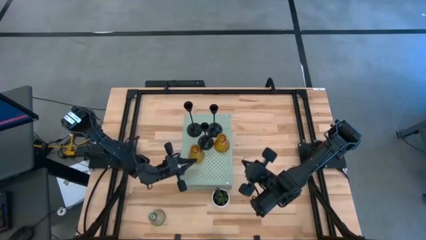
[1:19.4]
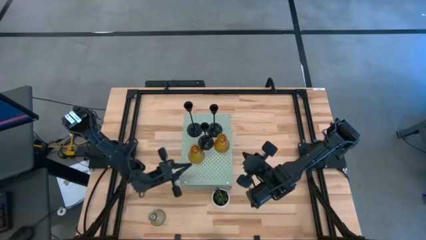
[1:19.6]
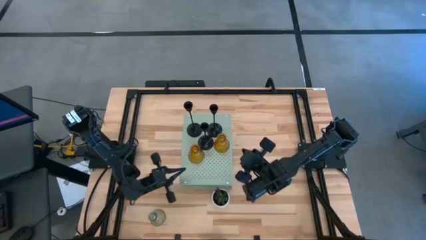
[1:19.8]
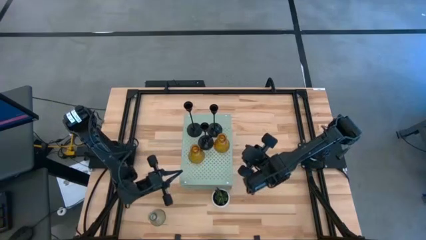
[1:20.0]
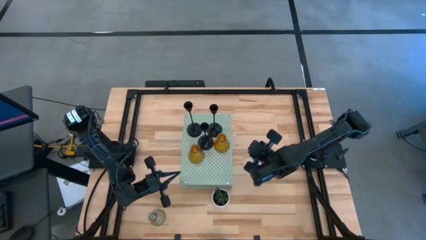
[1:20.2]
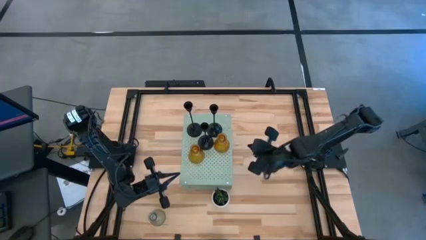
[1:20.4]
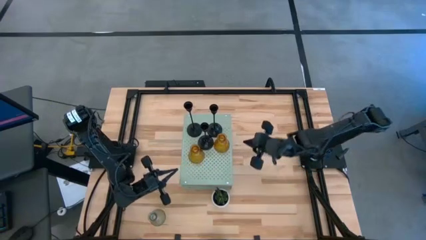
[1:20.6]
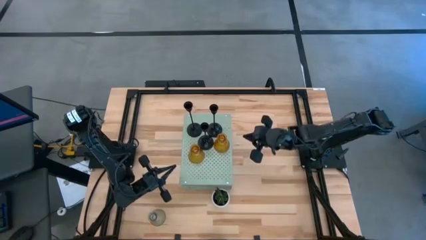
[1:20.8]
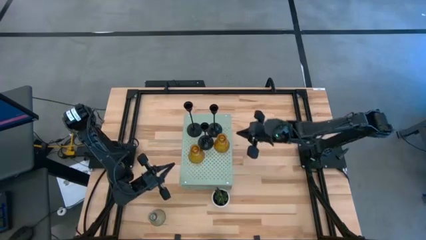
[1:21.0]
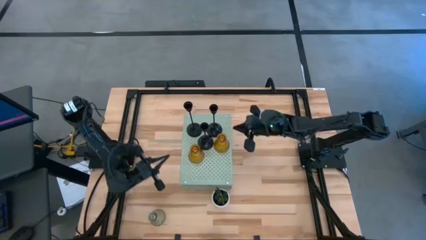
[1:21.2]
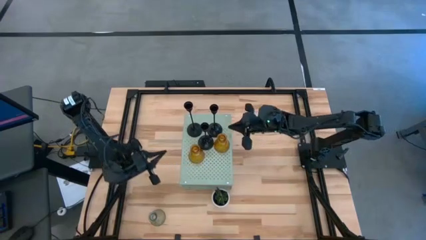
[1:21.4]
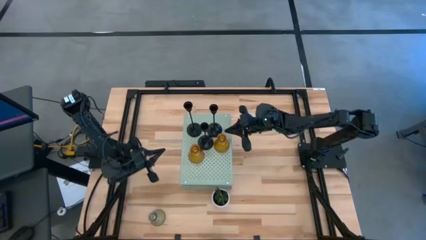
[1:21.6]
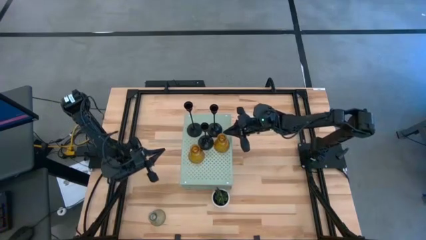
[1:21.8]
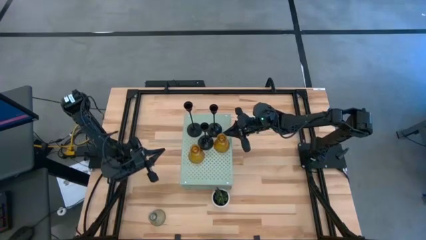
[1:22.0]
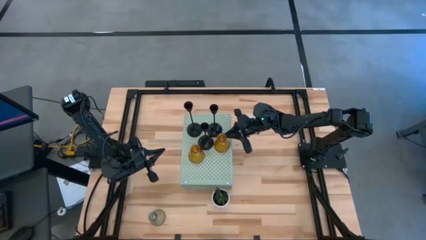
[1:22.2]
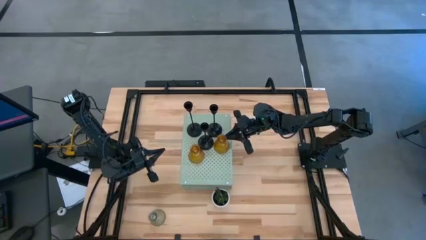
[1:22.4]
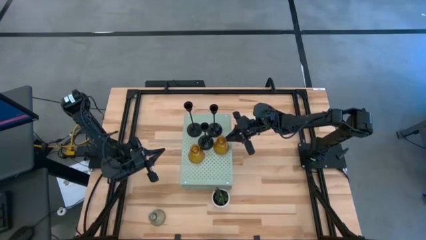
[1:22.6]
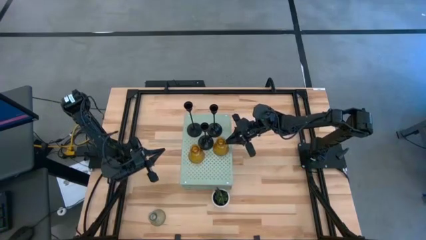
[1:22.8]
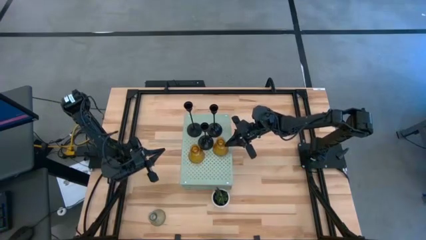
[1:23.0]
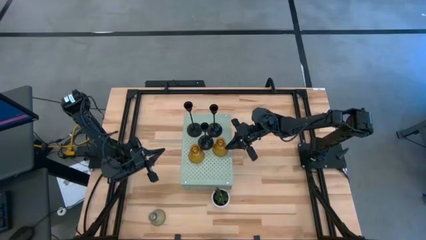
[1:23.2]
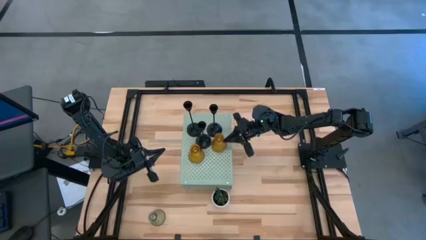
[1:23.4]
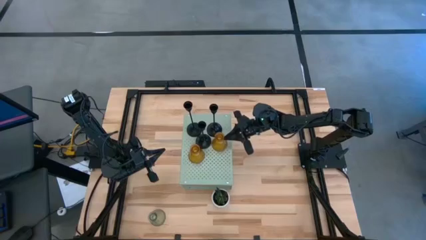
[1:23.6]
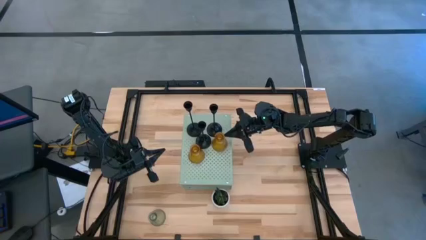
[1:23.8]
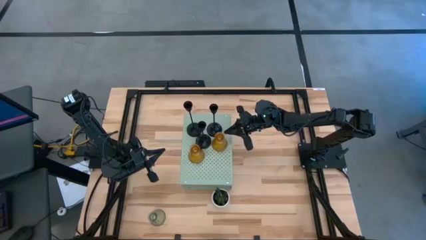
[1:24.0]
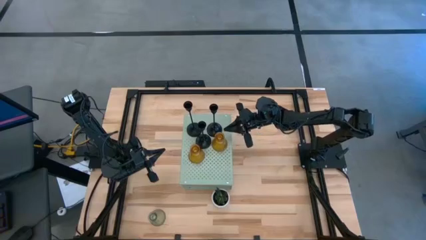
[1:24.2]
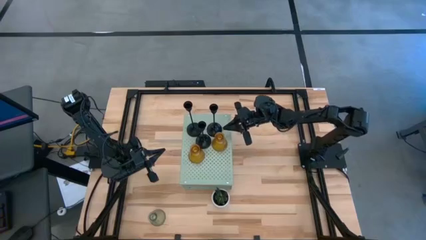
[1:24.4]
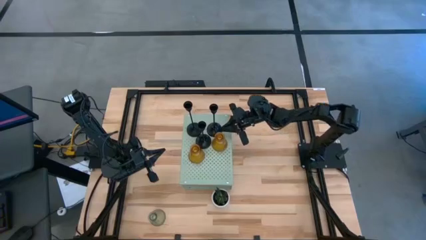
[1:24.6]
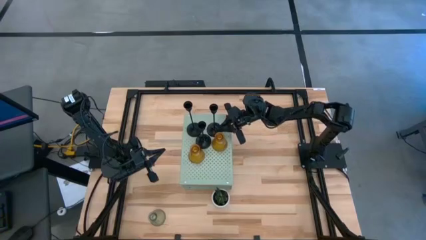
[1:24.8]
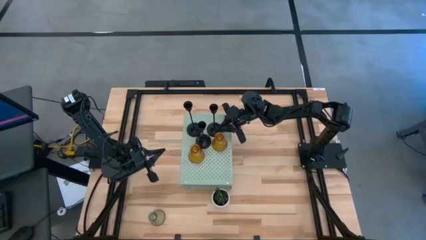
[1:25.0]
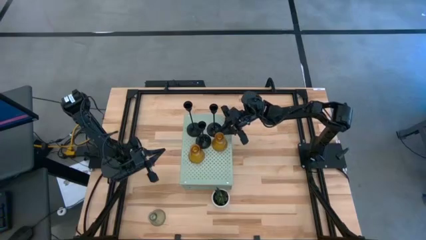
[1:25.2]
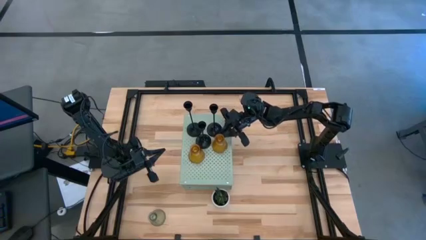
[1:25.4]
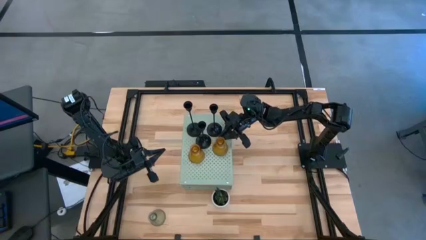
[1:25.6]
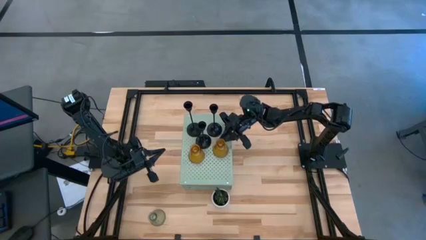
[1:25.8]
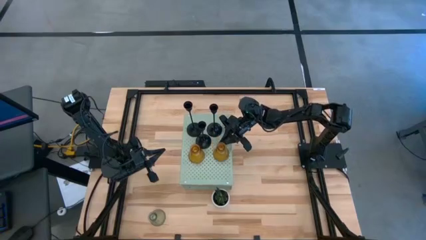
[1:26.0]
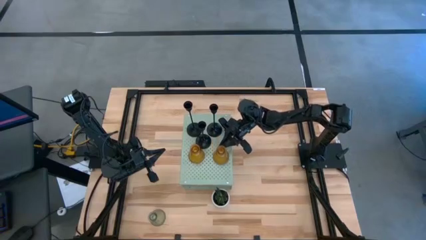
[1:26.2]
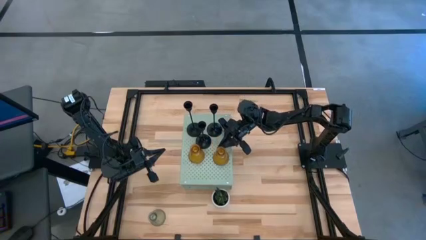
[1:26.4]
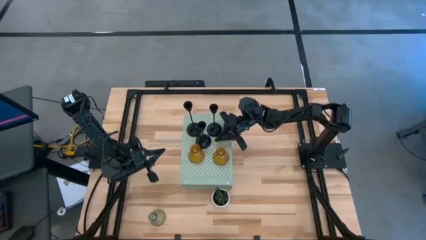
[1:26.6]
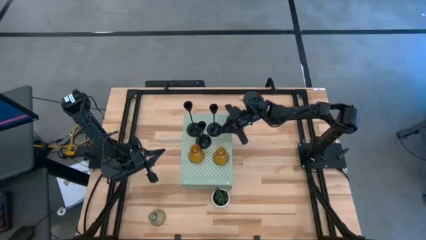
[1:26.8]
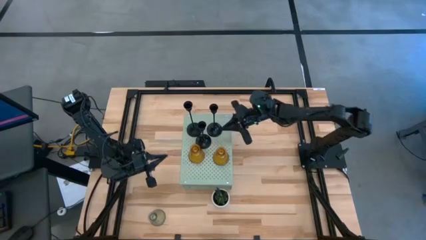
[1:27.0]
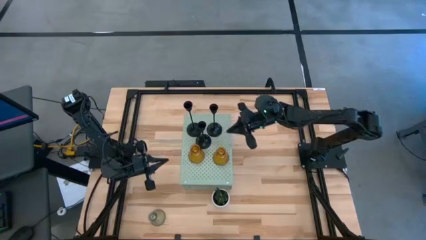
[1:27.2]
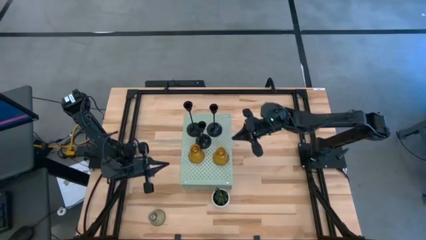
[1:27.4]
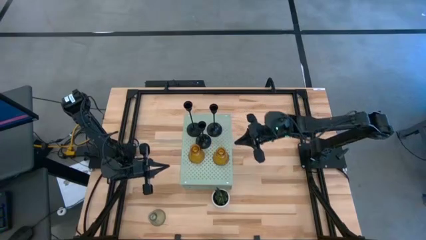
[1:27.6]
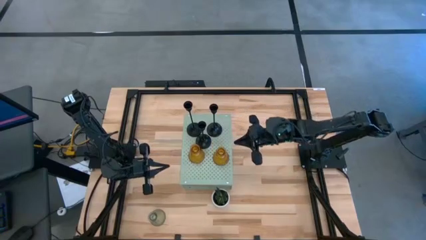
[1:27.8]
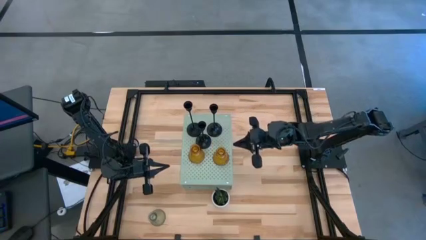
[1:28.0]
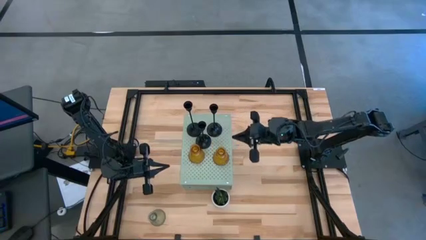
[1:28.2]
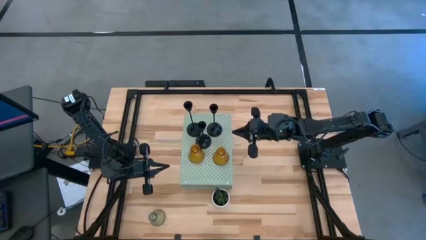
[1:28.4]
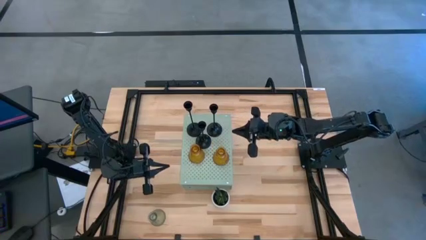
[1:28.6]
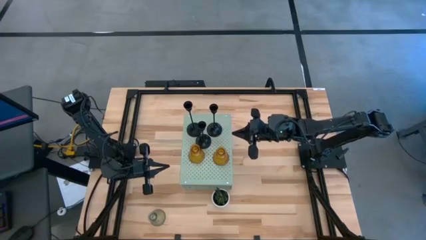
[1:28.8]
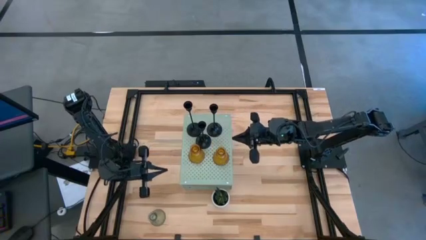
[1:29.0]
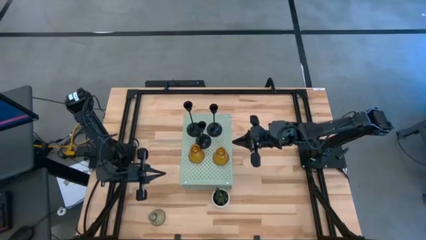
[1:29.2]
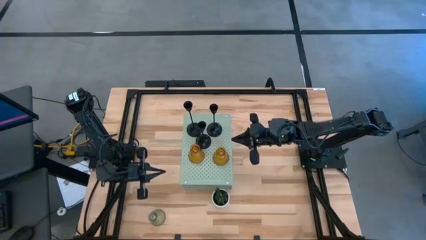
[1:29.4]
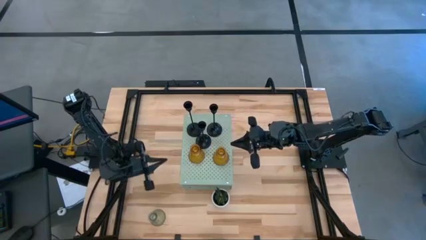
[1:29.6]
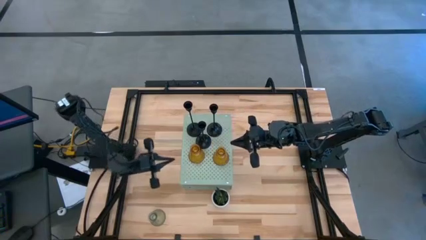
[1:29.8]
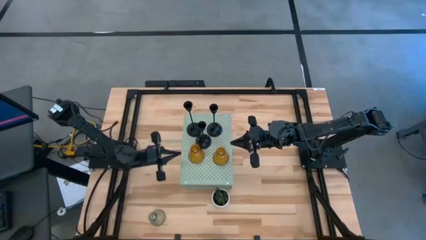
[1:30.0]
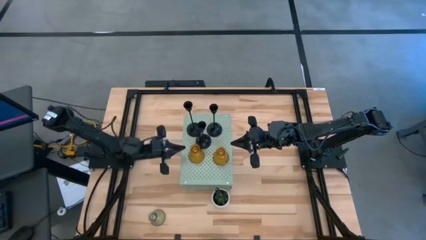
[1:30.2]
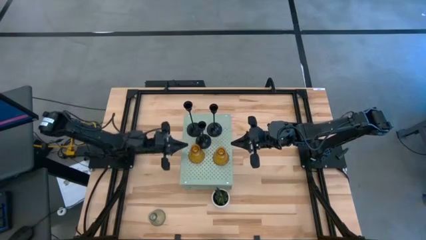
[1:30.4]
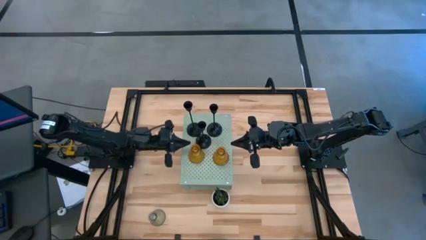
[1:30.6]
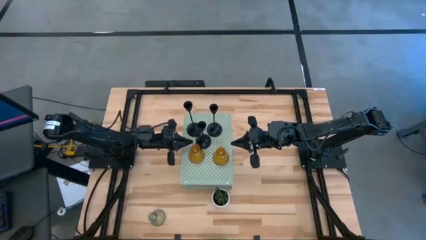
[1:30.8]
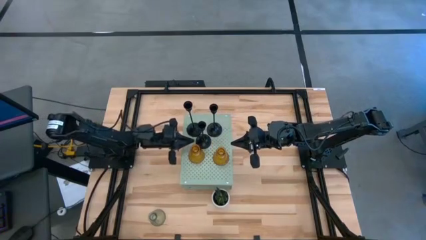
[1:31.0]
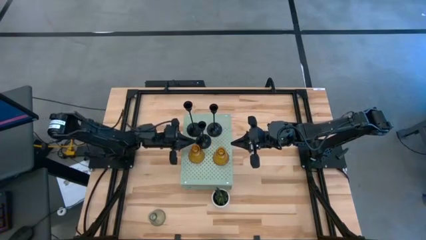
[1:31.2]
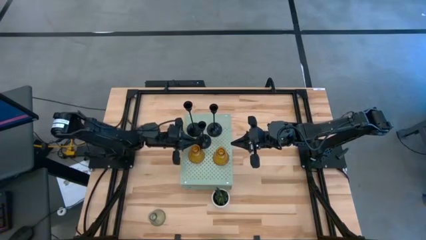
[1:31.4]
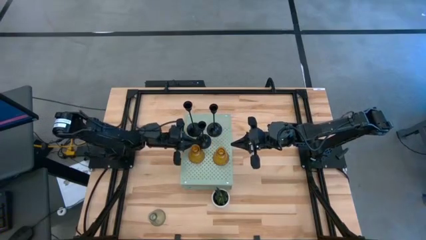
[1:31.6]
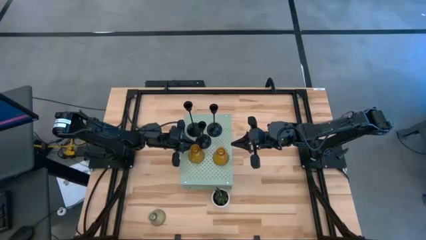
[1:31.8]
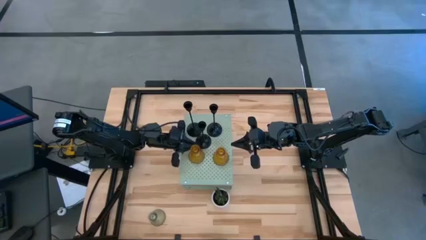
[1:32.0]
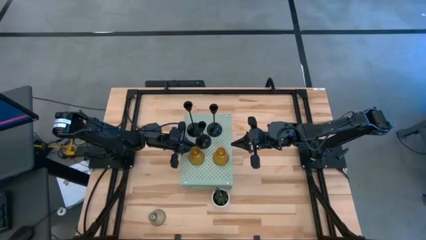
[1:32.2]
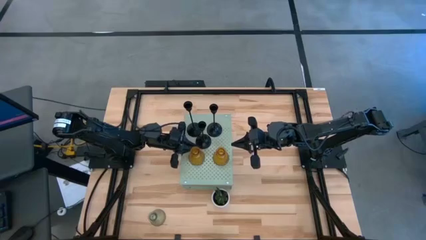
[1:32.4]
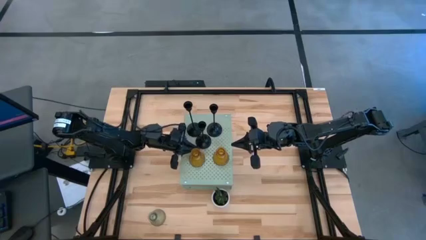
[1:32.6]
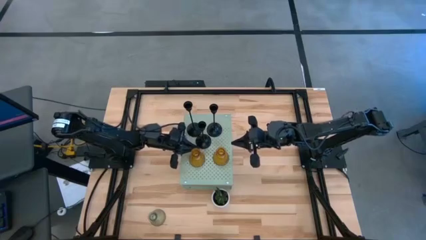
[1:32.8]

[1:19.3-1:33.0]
Task: Pick & Place candle stick holders
Adjust the right yellow candle holders

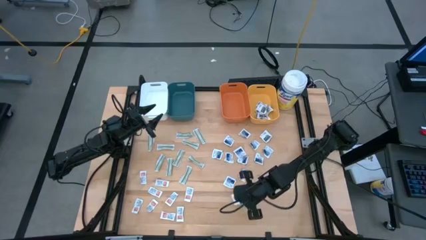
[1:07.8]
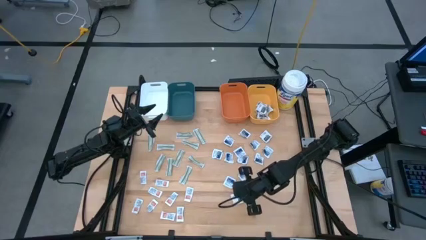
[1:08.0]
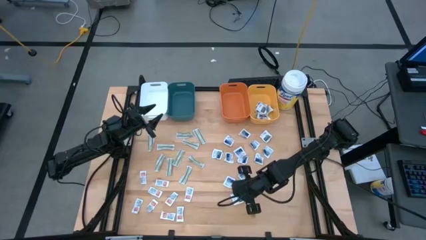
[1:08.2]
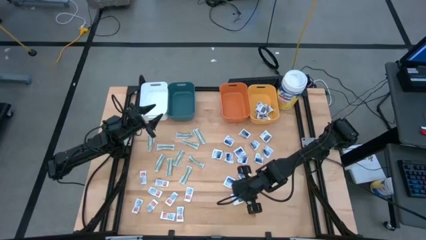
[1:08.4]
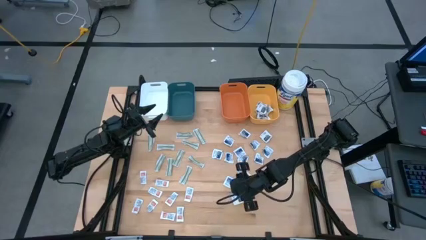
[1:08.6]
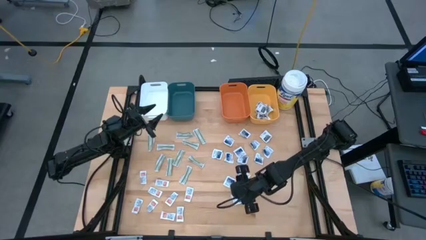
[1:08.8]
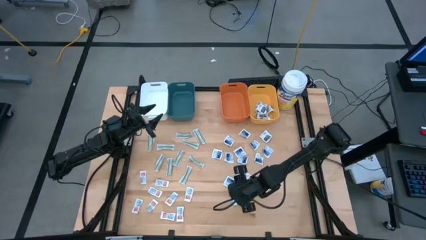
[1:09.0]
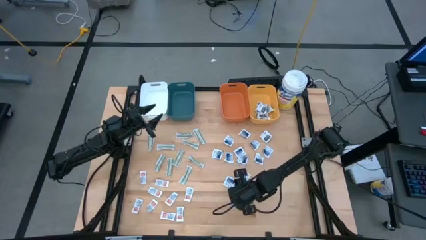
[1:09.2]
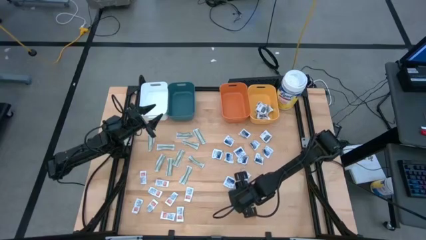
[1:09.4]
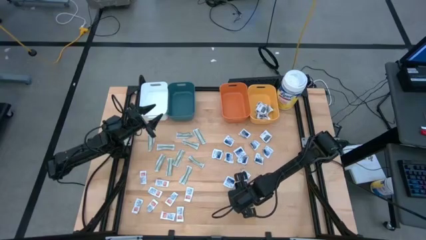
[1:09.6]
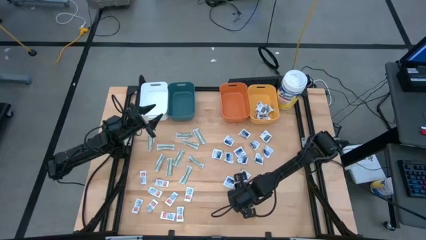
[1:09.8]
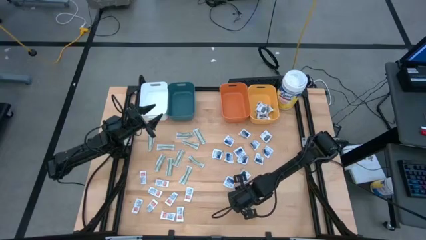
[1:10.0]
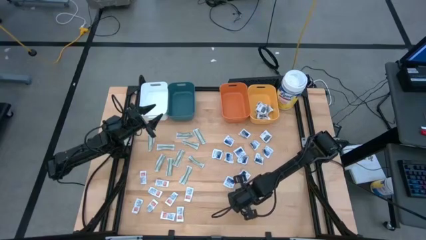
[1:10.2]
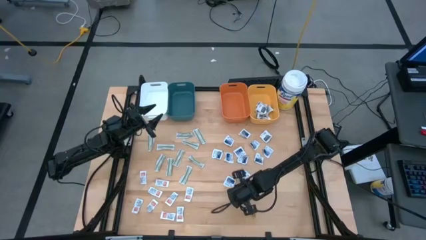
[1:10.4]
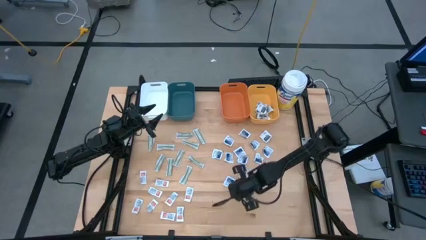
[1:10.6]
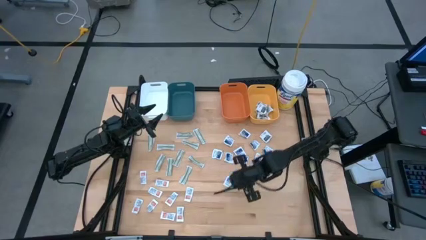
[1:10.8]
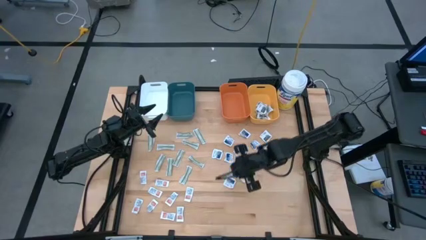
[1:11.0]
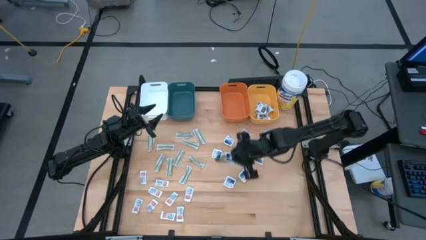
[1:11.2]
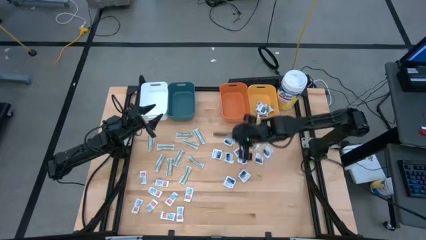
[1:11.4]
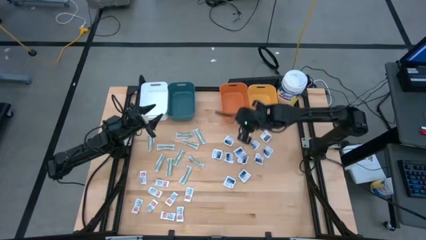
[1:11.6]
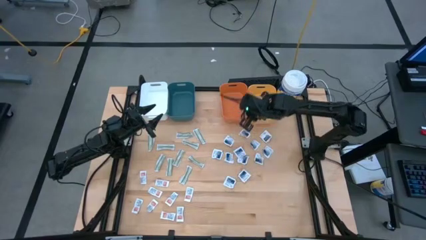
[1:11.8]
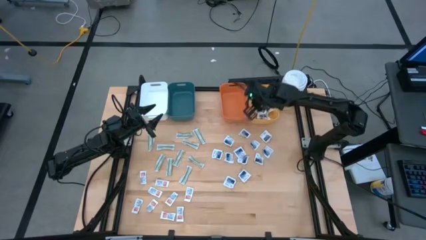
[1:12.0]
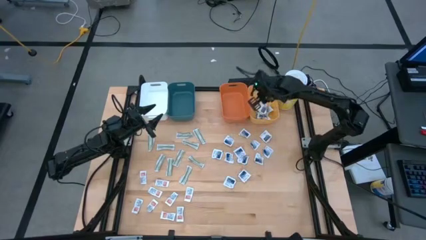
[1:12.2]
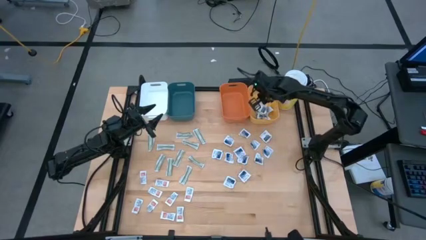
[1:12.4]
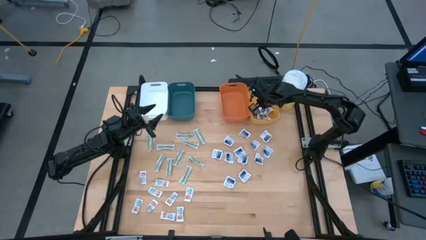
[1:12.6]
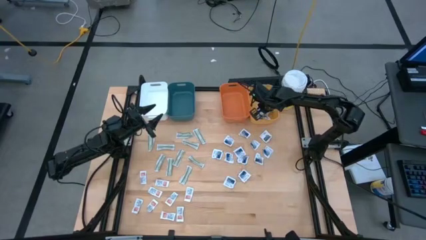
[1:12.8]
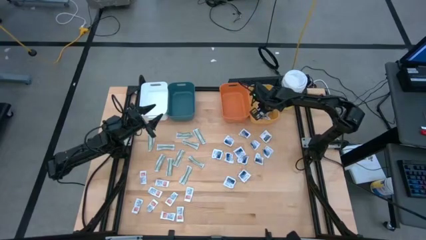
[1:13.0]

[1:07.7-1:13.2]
Task: Pick & Place First Aid Supplies
Put the towelette pack into the yellow bin
